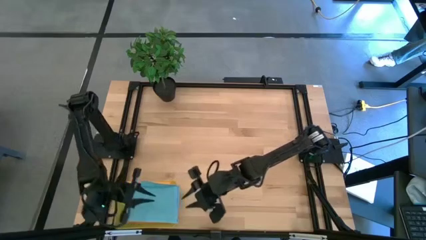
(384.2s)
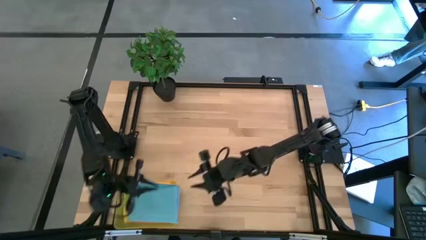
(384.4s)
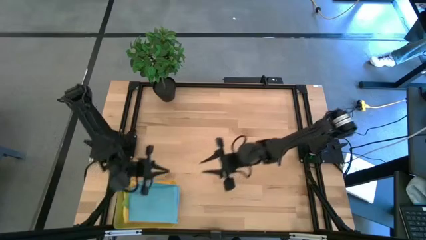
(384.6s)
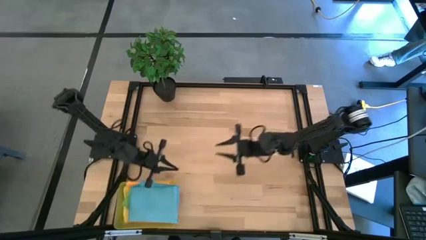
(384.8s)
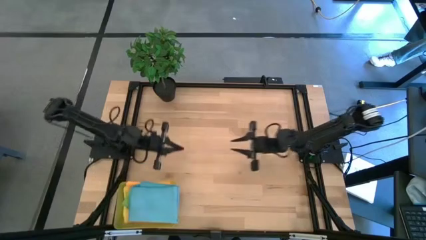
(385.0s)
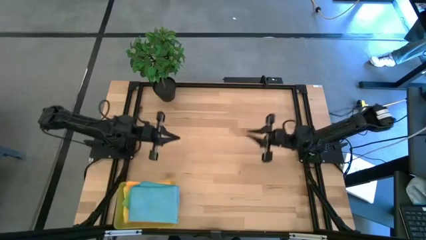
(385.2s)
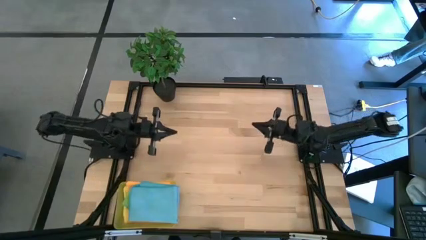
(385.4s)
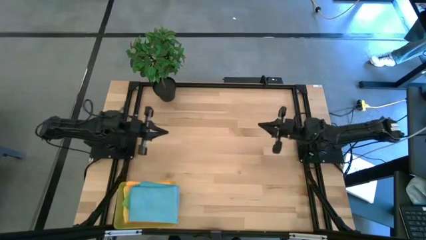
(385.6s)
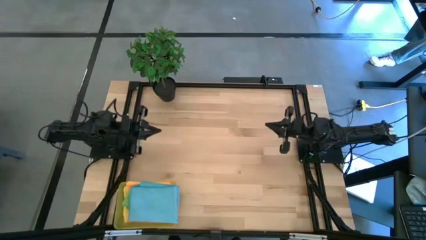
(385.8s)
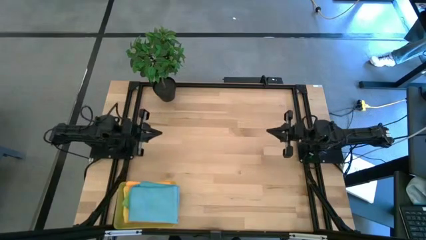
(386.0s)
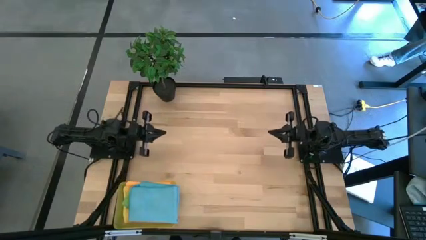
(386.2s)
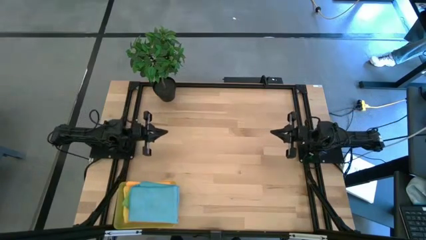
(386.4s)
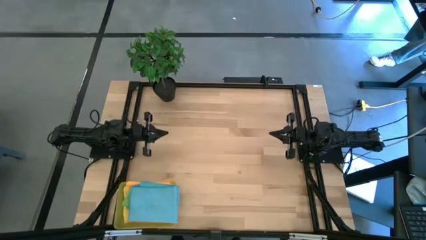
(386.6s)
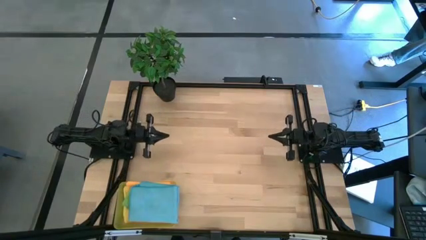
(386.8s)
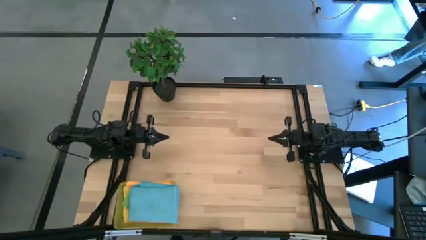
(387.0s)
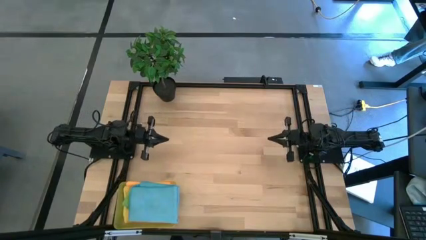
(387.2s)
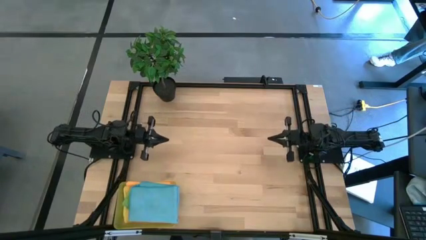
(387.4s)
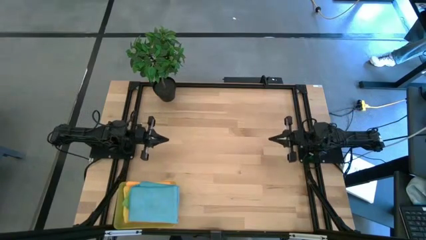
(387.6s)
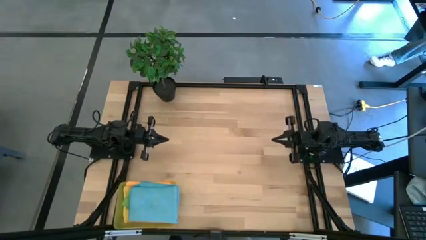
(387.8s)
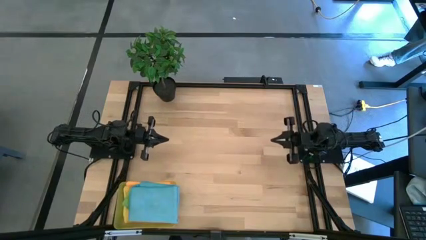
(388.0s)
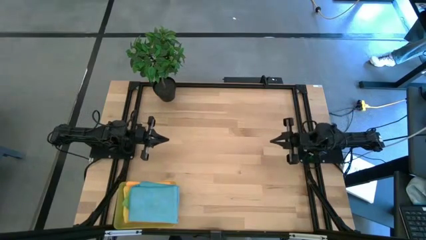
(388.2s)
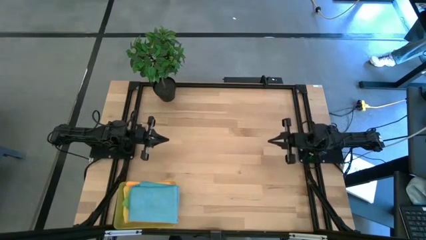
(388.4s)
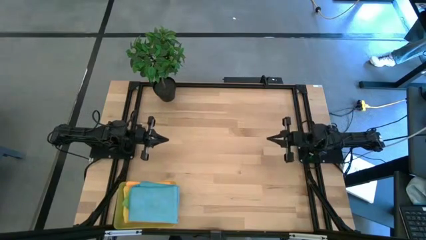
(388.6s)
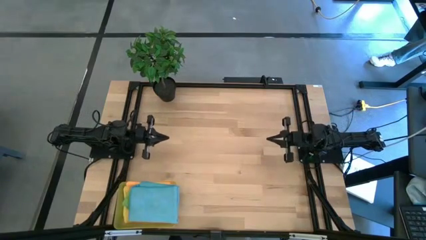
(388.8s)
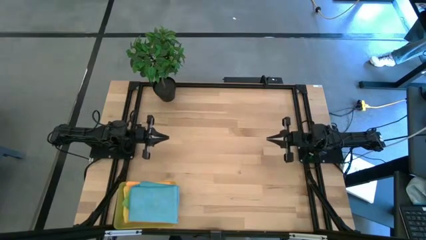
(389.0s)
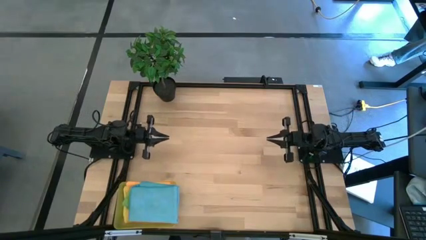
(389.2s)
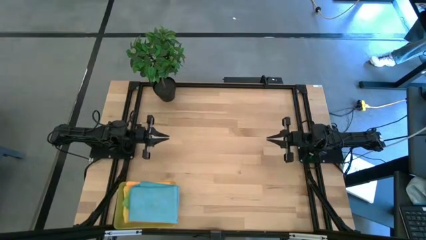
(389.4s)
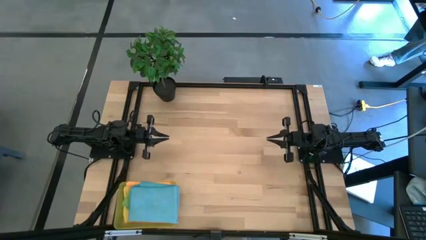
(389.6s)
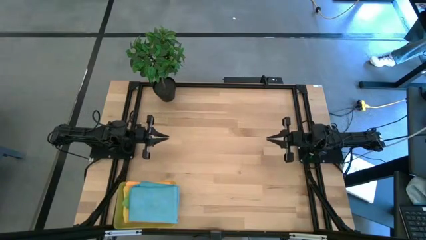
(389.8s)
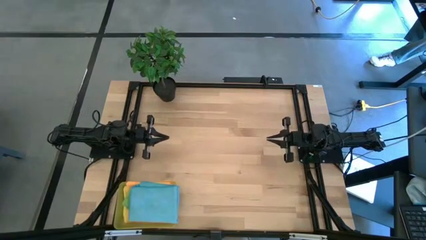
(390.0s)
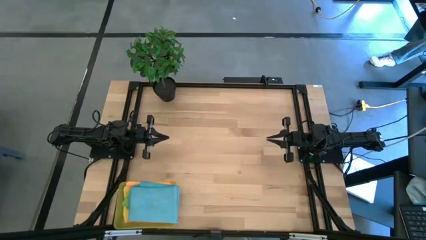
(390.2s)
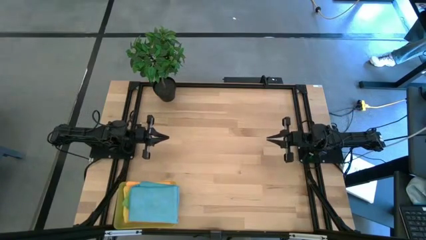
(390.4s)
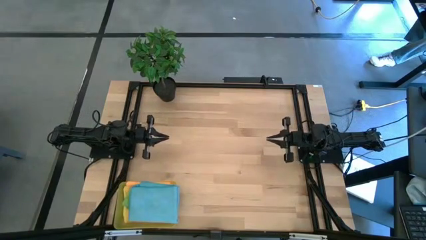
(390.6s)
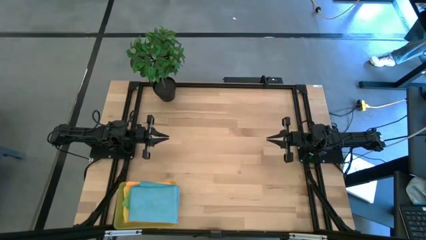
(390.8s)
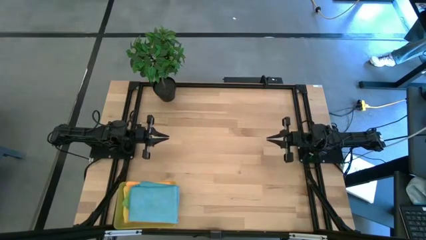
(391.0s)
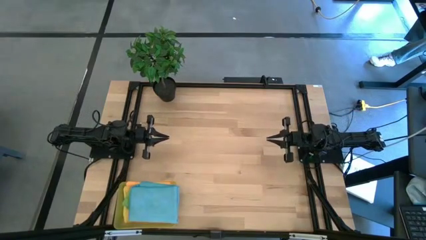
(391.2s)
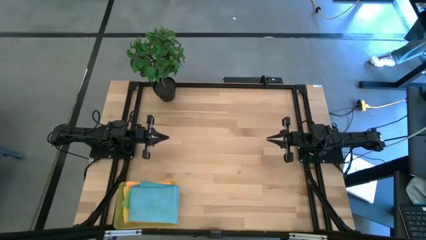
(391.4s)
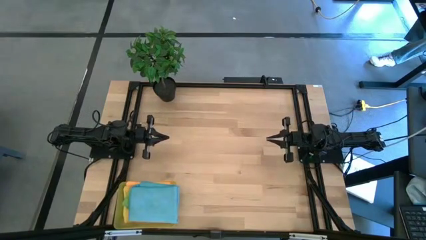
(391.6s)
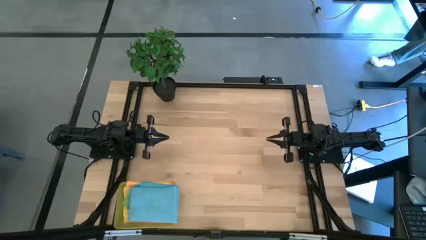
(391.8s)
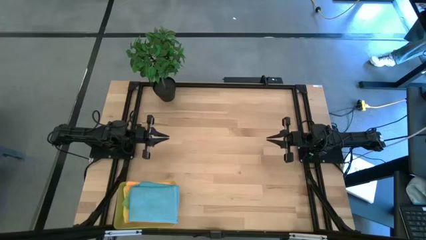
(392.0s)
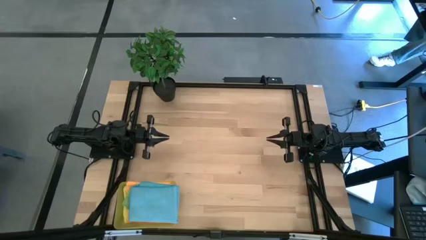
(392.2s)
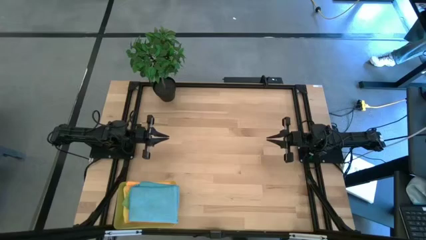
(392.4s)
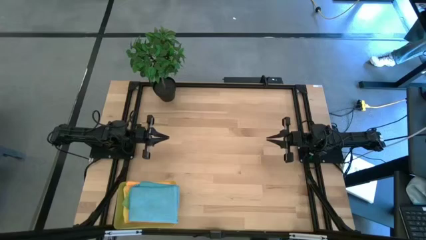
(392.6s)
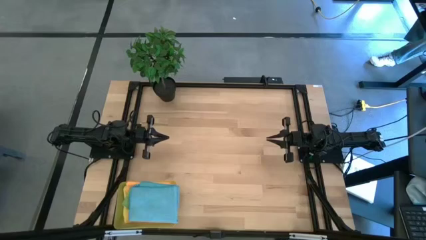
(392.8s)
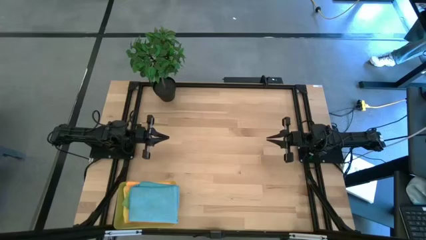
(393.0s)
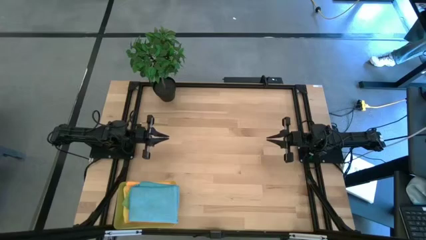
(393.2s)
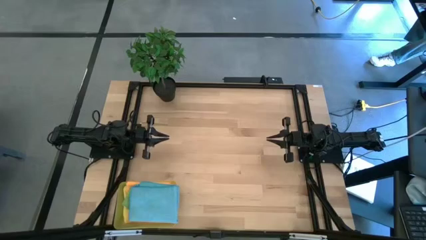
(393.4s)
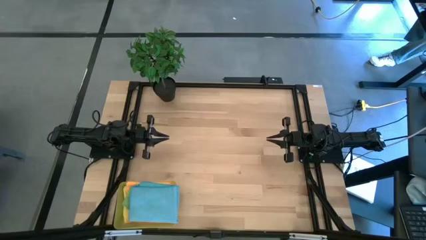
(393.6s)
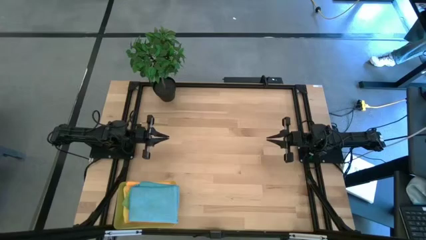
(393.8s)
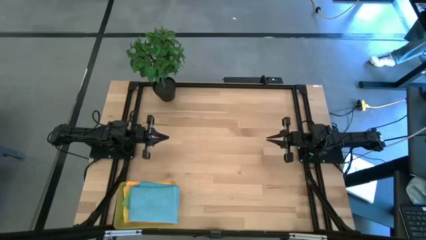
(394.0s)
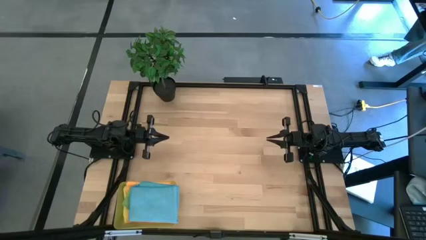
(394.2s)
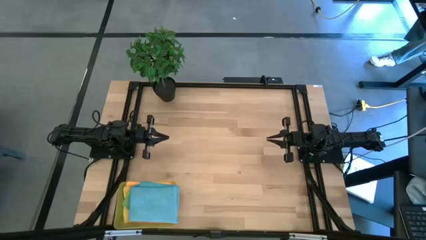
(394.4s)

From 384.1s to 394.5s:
Task: Fold microfiber towels
Return to Home Position
